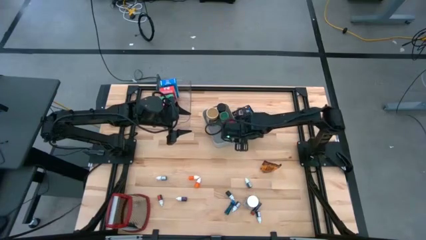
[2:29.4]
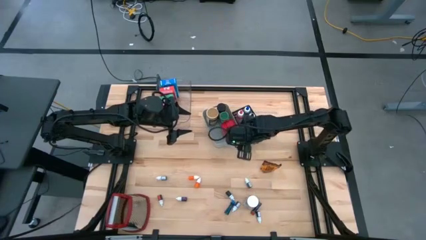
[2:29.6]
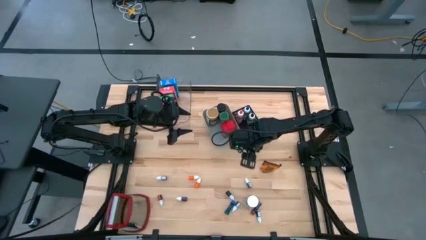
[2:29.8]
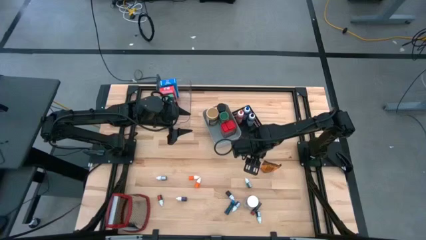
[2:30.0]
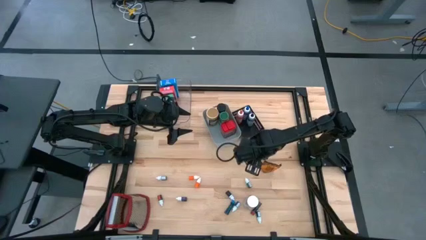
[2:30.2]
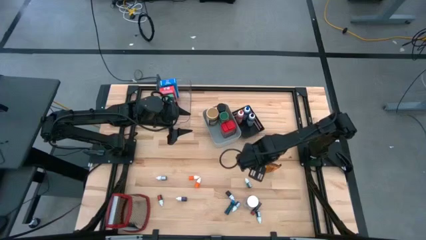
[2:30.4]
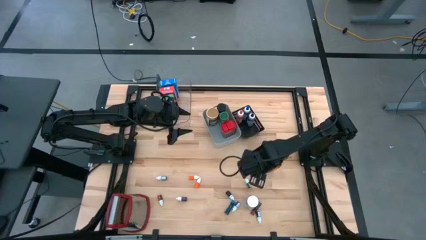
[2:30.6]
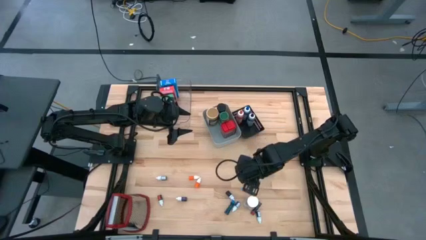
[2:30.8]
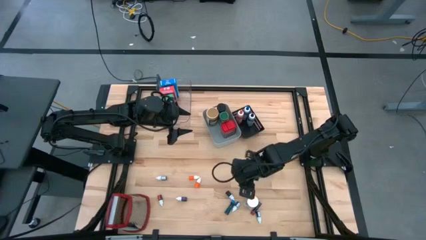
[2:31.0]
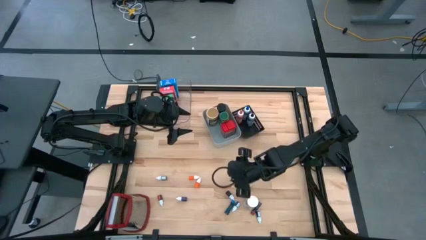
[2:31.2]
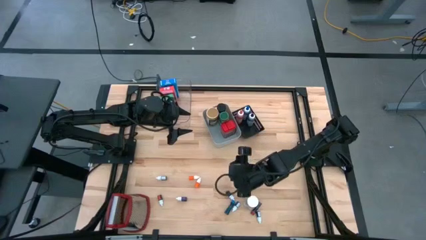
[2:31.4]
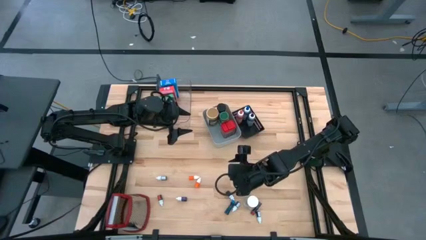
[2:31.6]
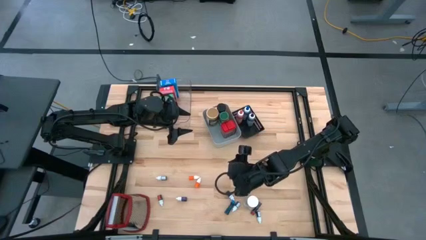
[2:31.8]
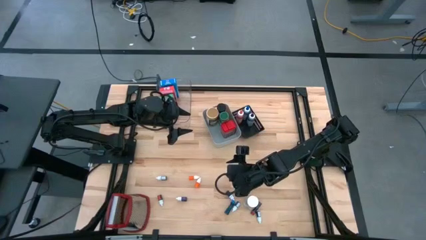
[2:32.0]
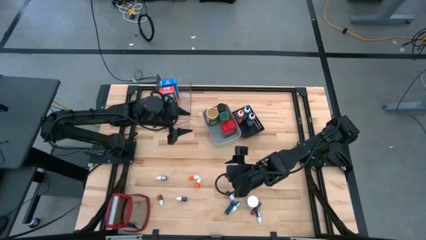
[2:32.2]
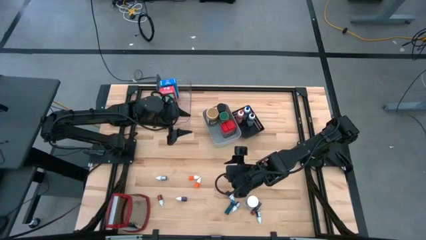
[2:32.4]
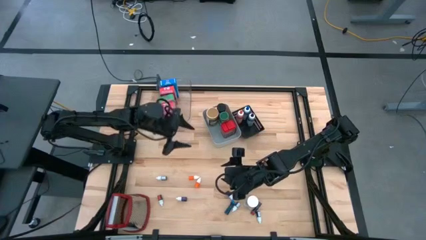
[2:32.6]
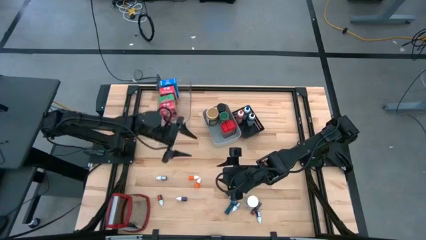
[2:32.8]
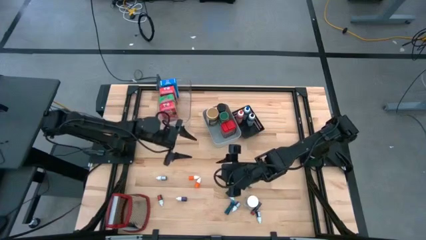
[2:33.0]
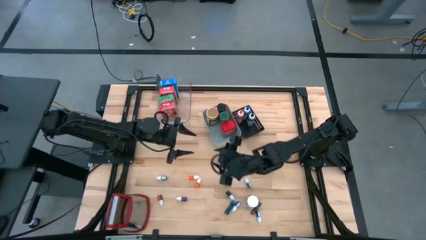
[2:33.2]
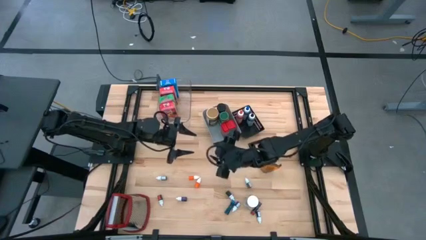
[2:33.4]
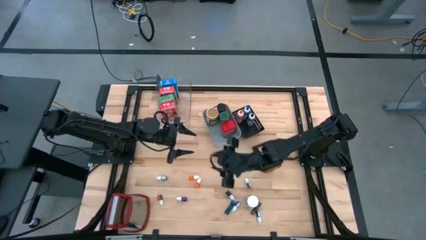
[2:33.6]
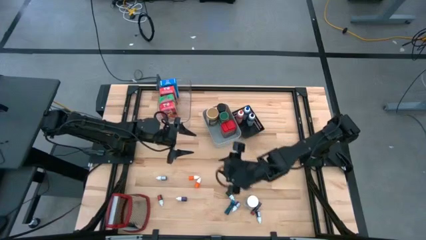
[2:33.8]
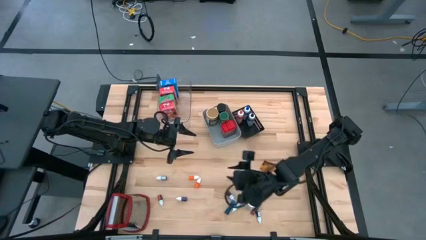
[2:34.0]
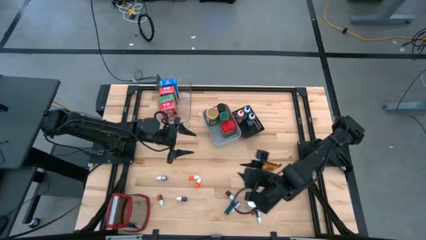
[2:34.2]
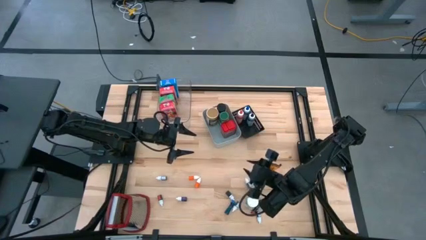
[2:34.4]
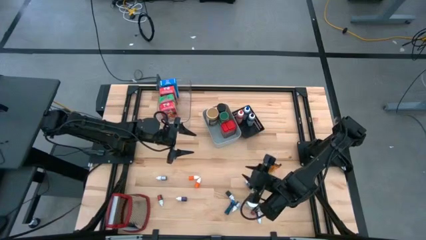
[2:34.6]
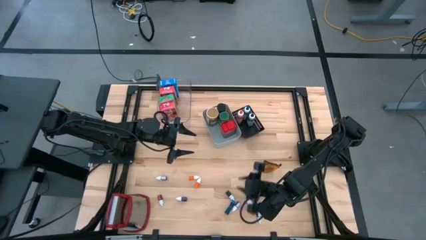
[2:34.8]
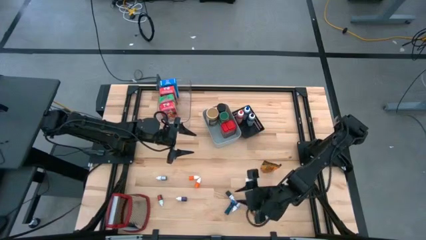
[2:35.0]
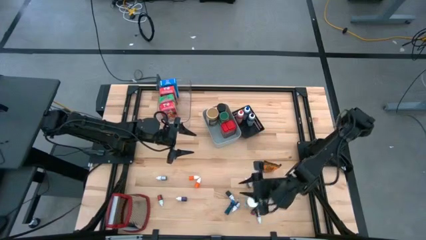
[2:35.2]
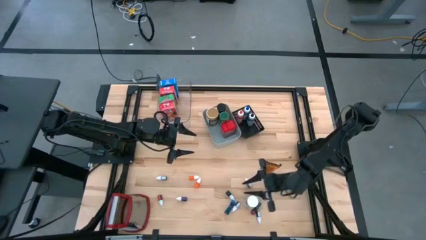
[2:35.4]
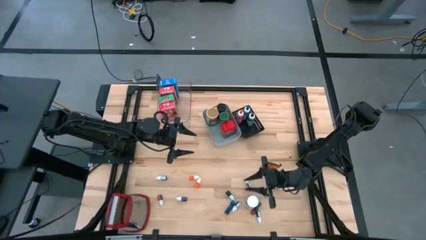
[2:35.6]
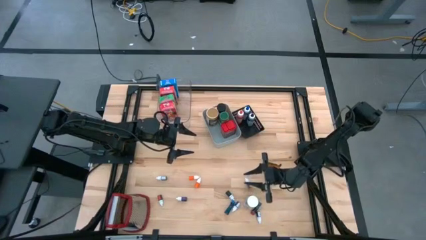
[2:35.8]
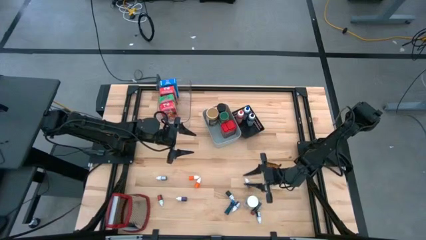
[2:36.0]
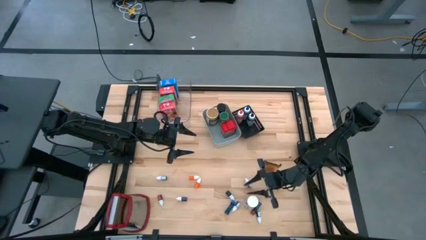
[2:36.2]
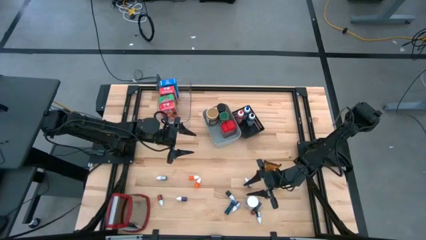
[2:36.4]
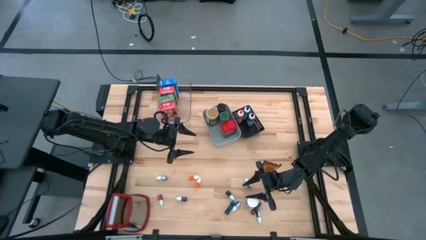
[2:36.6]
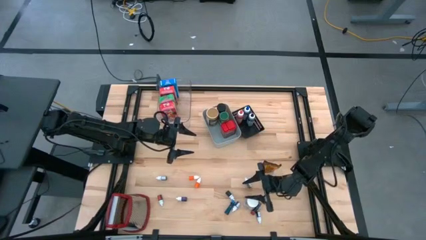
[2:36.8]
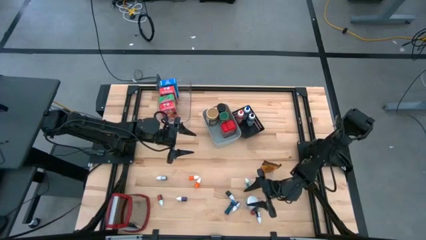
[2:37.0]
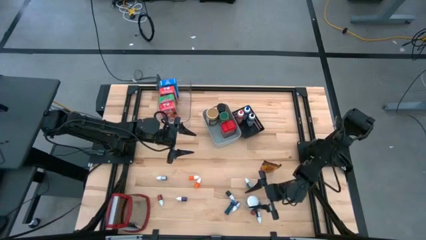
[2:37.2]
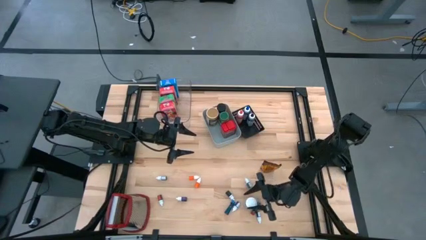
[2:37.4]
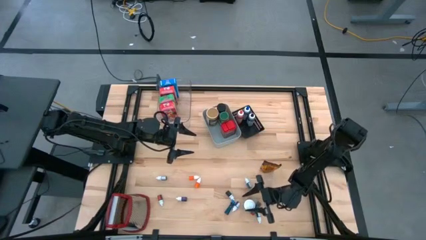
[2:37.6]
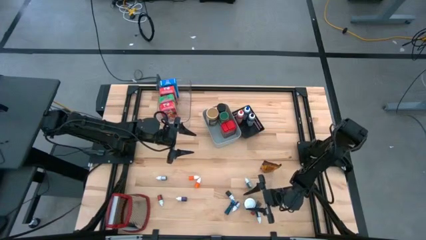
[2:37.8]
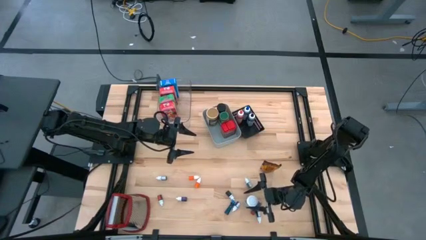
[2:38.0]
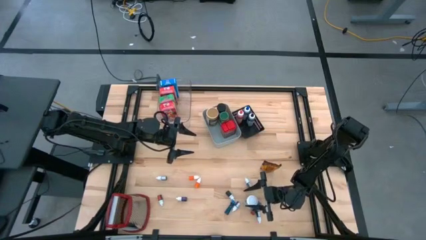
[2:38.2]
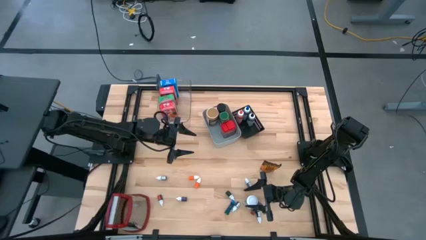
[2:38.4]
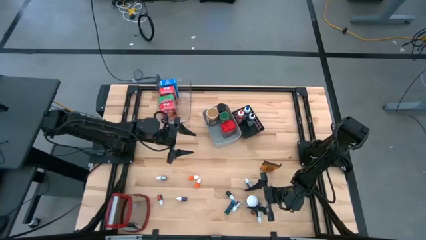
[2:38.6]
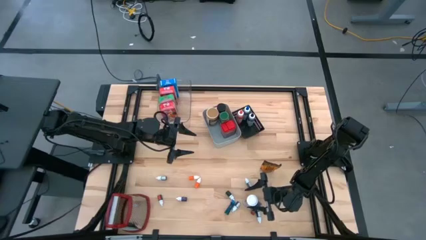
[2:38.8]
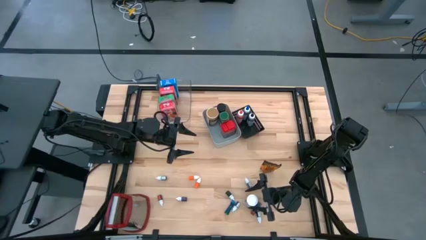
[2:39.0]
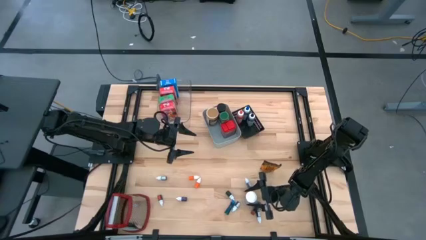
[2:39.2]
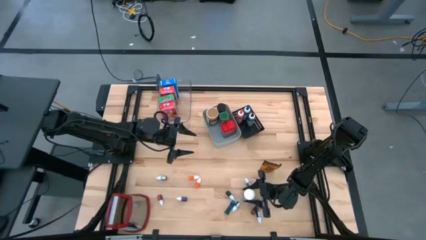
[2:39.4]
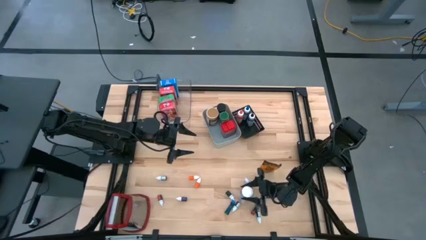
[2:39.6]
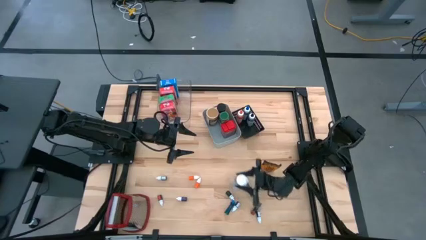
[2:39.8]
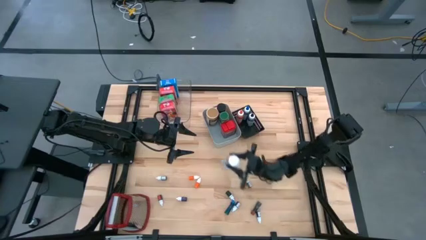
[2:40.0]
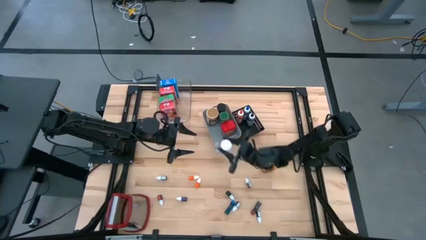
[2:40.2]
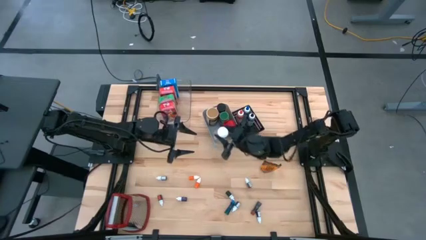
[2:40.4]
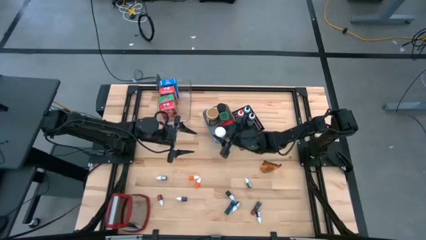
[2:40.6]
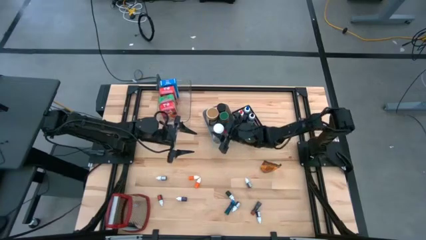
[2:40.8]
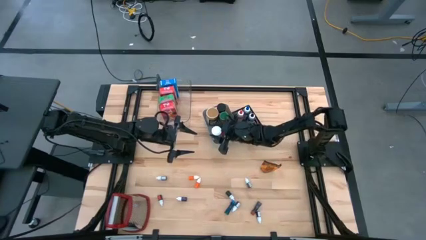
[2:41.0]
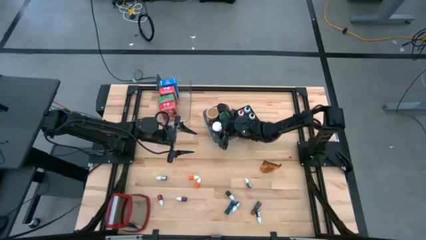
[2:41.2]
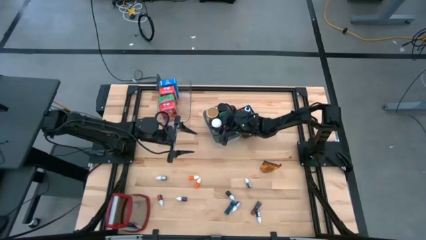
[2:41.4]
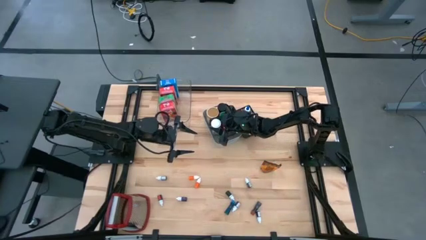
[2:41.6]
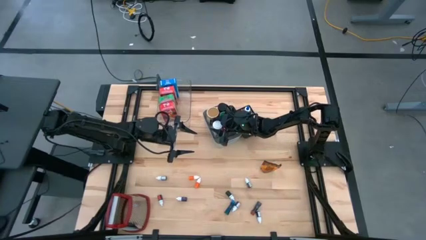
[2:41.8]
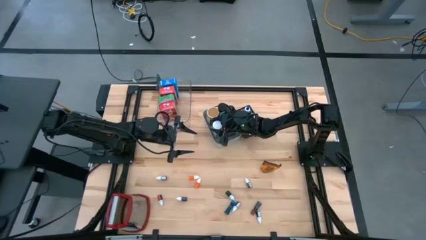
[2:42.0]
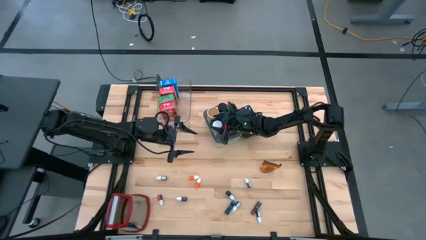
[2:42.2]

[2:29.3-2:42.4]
Task: Pick & Place Kitchen Items
Put the white seasoning bottle into the gray bin

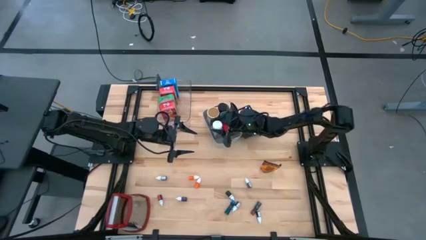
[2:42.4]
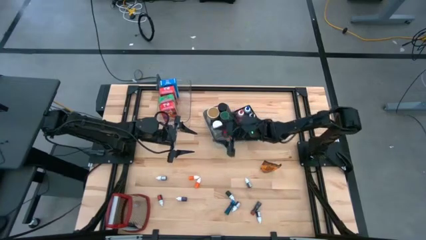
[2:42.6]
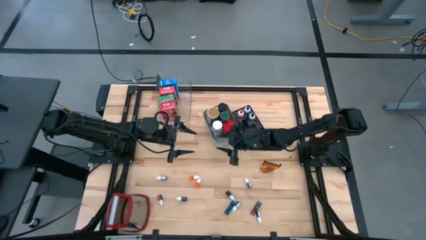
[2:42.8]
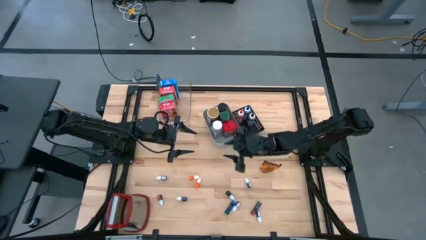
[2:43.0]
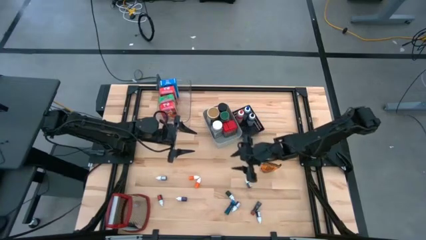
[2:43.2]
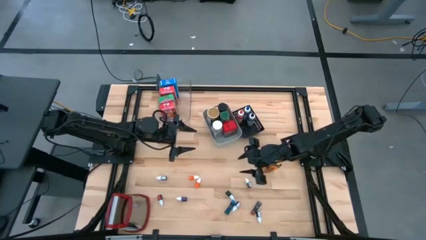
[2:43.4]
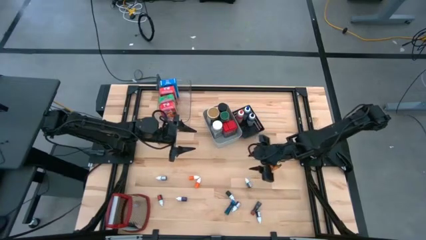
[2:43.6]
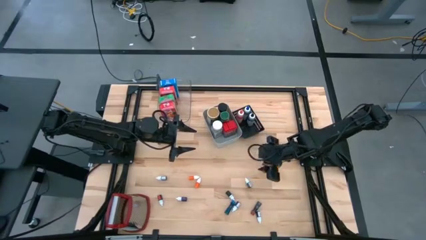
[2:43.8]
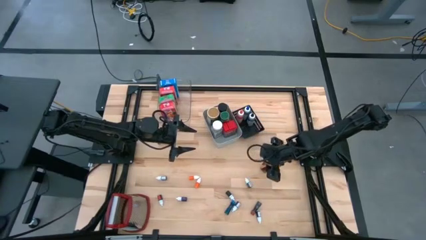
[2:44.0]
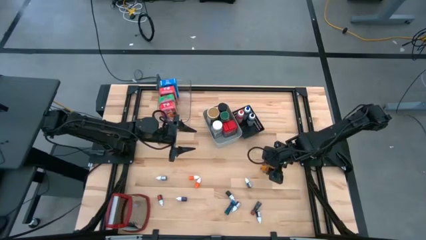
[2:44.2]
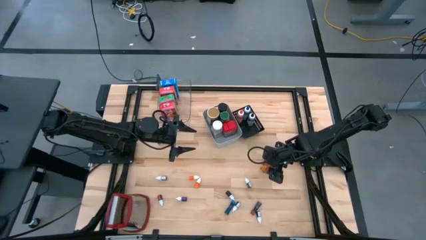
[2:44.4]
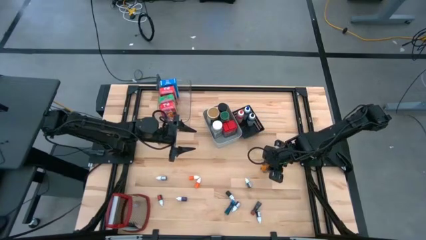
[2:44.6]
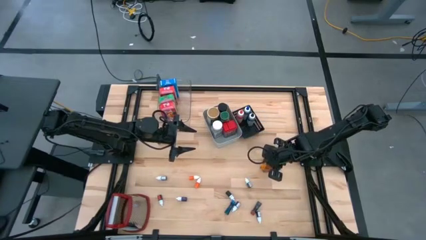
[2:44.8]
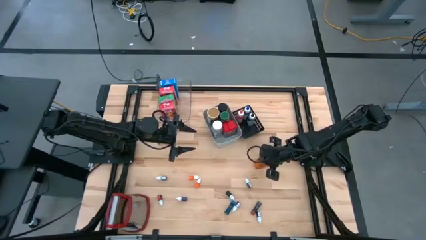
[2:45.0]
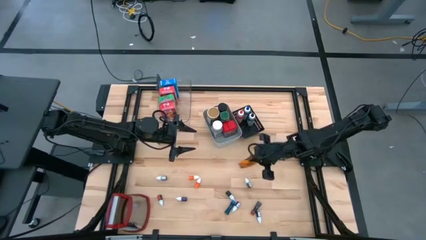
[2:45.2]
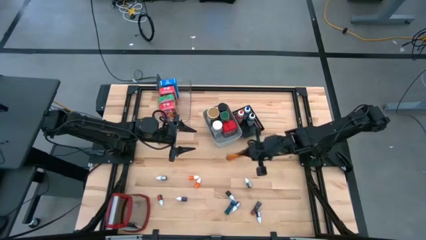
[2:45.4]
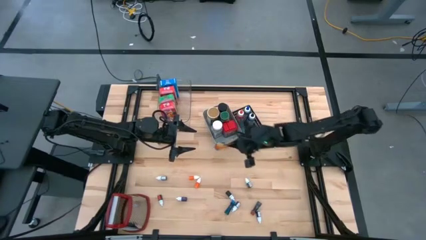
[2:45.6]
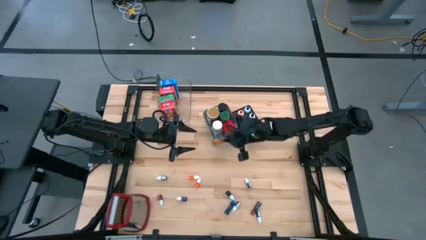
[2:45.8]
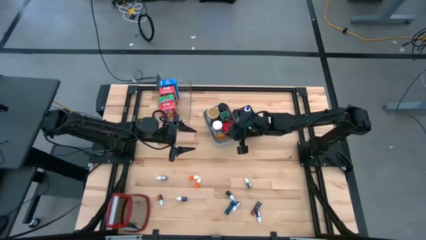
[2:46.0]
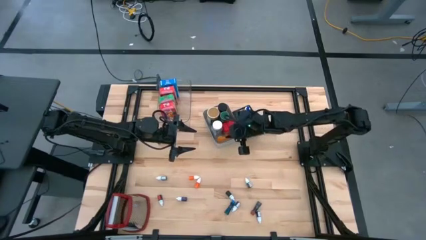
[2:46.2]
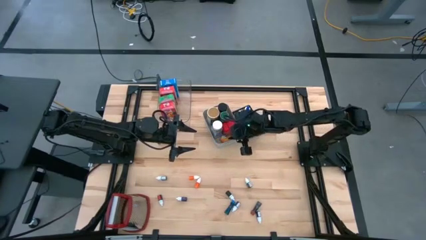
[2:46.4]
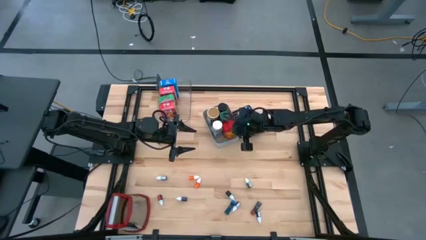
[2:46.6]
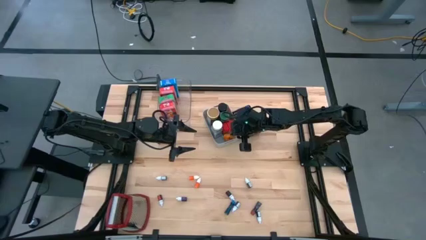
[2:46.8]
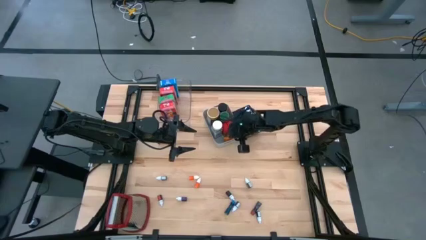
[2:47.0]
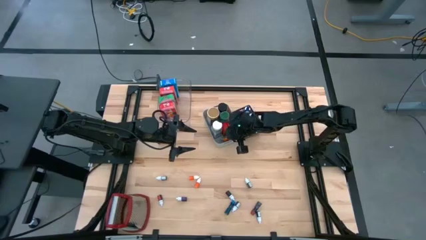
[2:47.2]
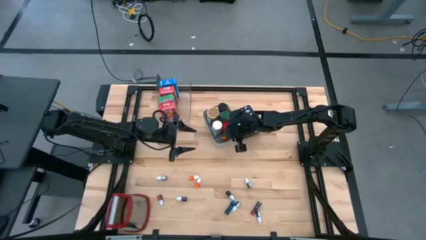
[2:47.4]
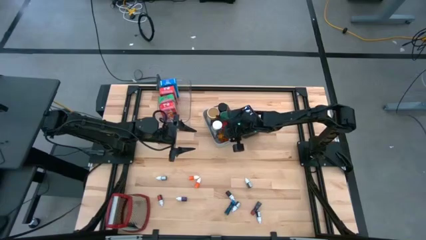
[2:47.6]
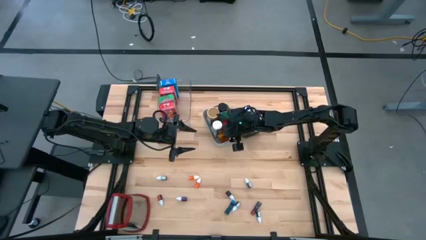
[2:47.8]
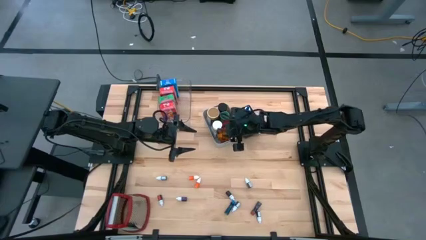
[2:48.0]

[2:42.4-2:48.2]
Put the orange seasoning pack into the gray bin
